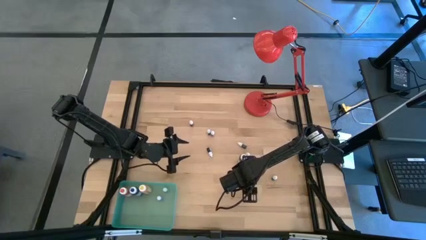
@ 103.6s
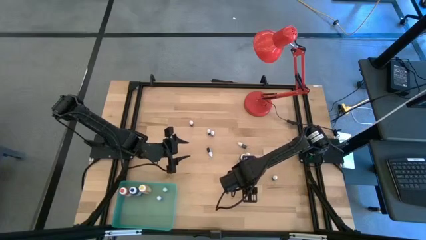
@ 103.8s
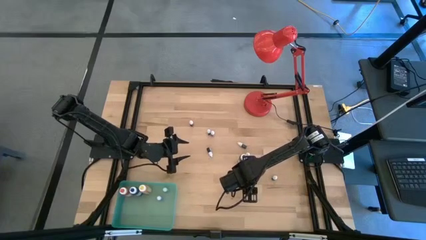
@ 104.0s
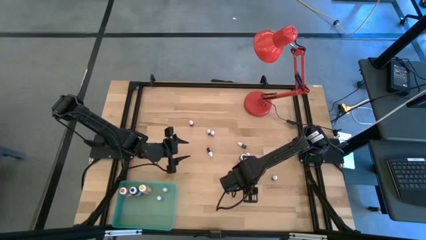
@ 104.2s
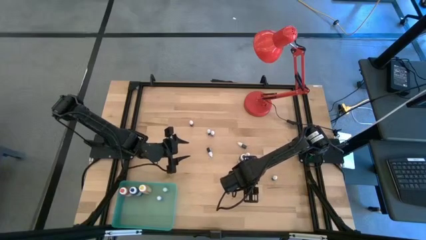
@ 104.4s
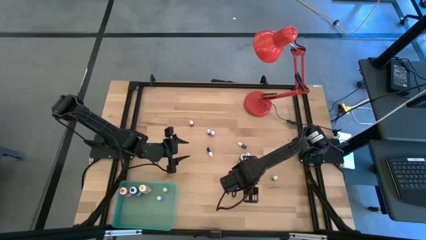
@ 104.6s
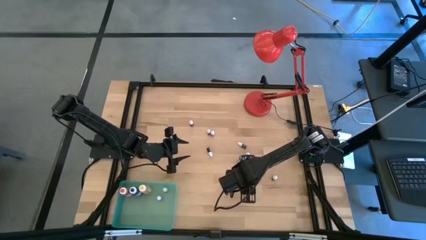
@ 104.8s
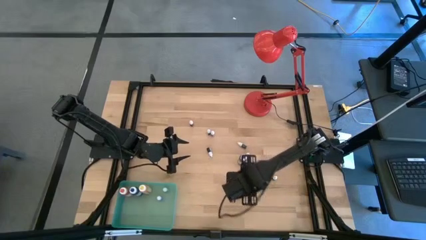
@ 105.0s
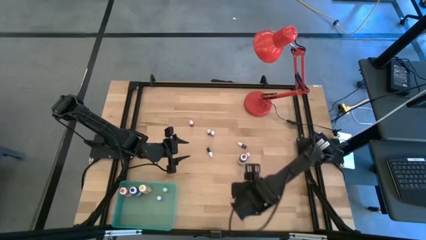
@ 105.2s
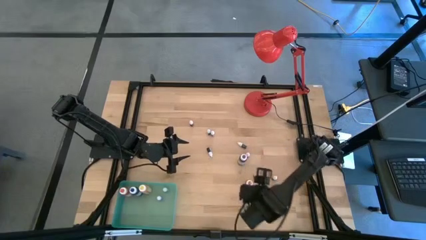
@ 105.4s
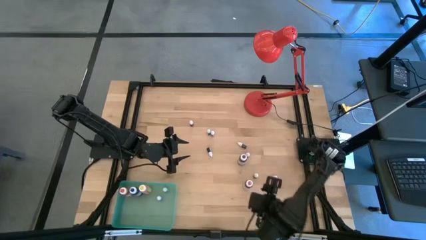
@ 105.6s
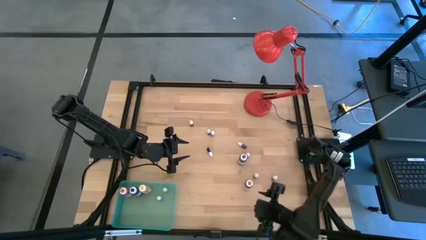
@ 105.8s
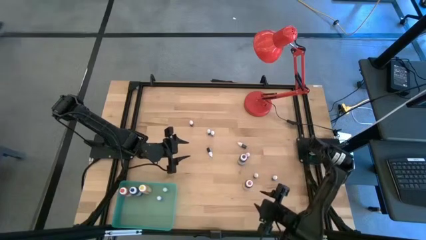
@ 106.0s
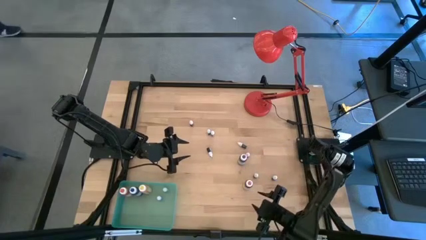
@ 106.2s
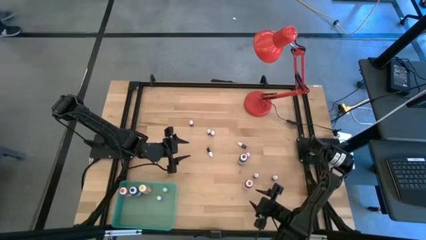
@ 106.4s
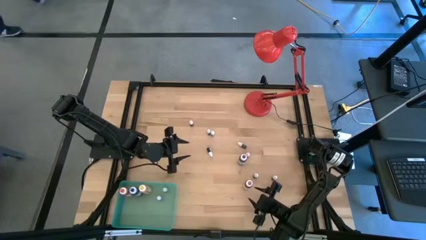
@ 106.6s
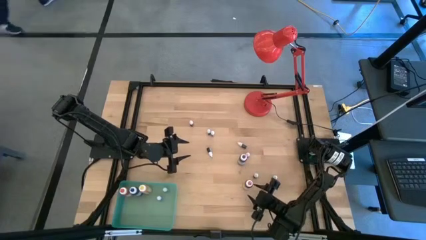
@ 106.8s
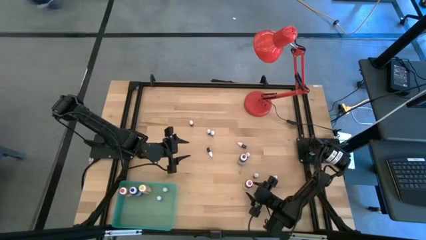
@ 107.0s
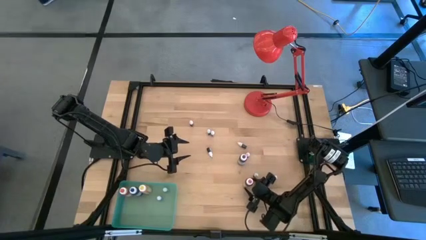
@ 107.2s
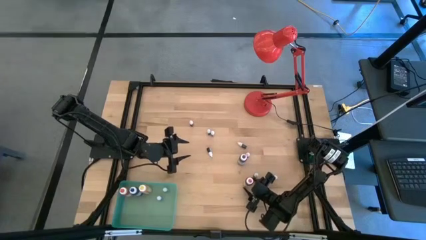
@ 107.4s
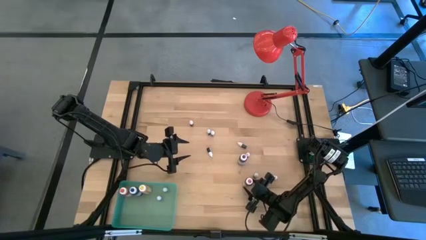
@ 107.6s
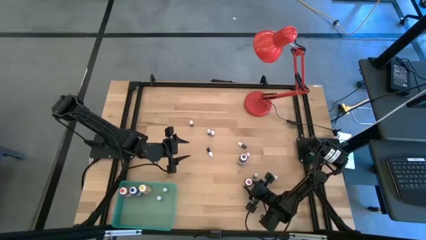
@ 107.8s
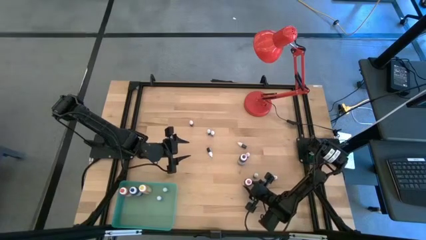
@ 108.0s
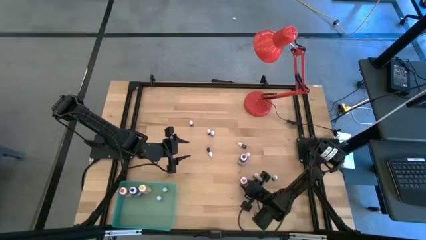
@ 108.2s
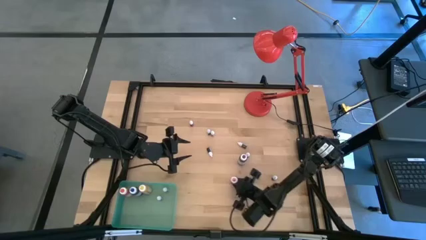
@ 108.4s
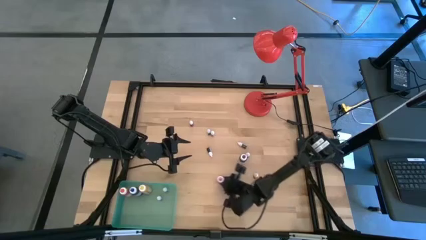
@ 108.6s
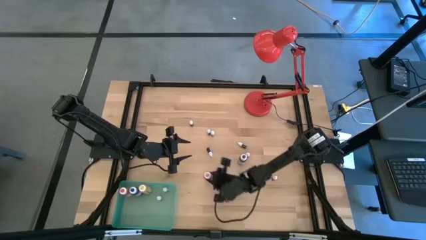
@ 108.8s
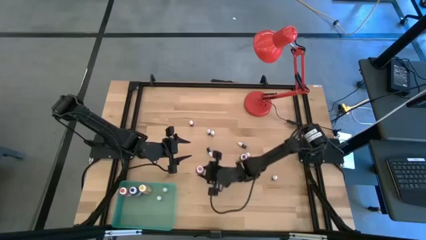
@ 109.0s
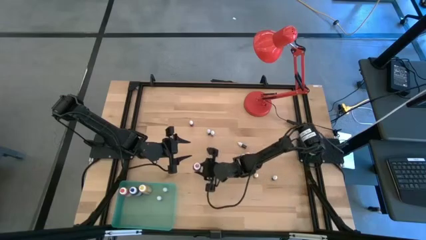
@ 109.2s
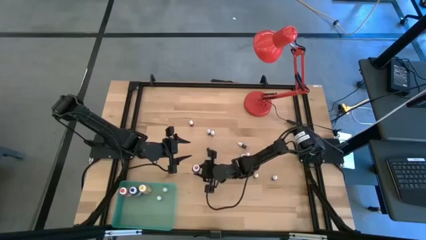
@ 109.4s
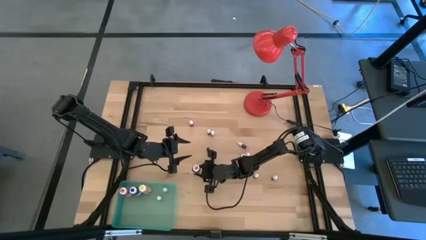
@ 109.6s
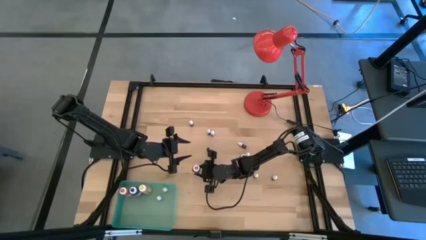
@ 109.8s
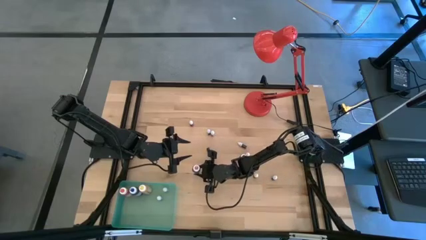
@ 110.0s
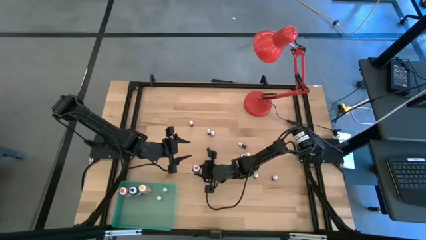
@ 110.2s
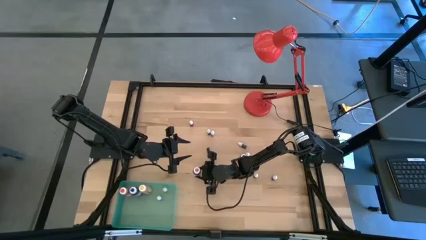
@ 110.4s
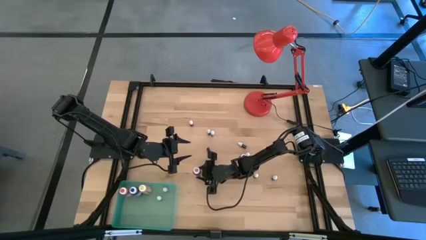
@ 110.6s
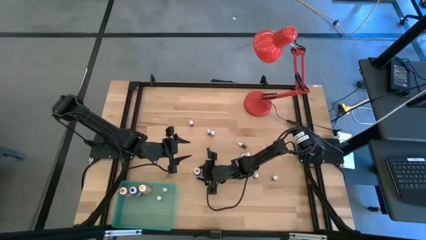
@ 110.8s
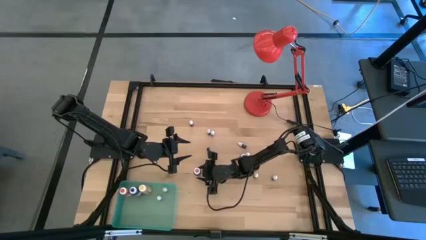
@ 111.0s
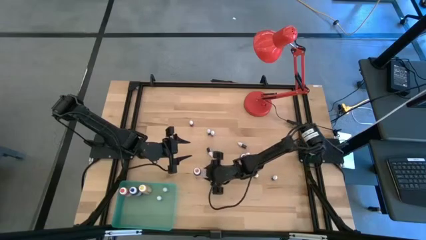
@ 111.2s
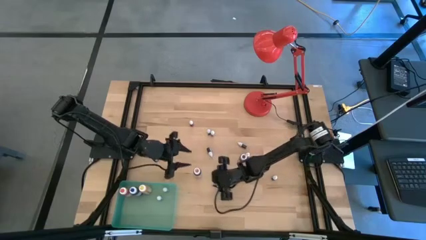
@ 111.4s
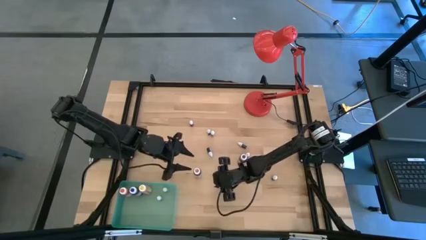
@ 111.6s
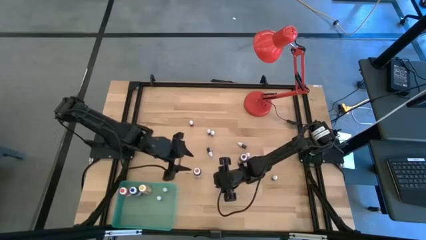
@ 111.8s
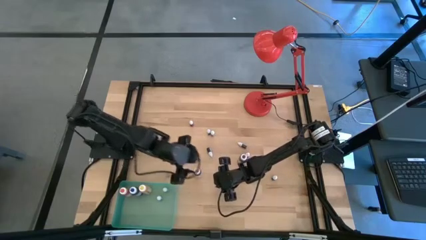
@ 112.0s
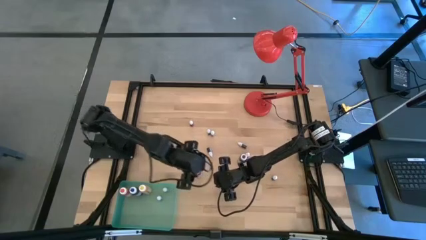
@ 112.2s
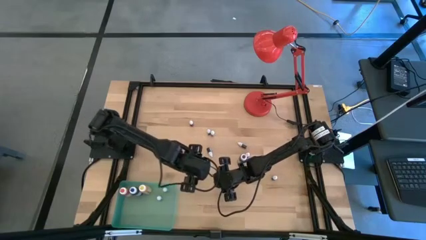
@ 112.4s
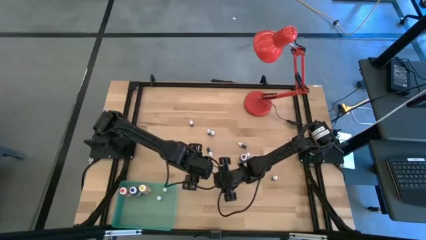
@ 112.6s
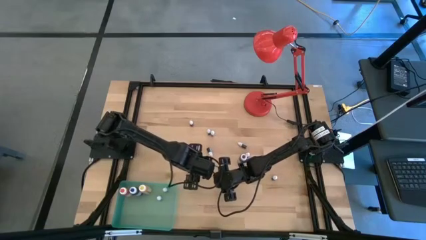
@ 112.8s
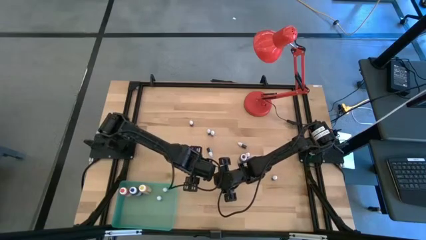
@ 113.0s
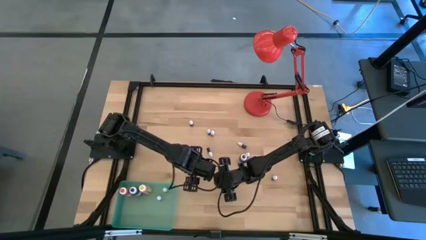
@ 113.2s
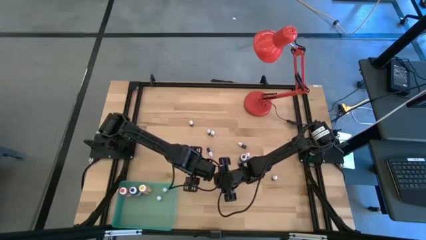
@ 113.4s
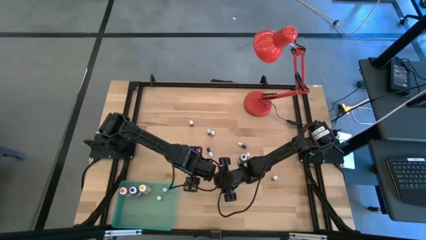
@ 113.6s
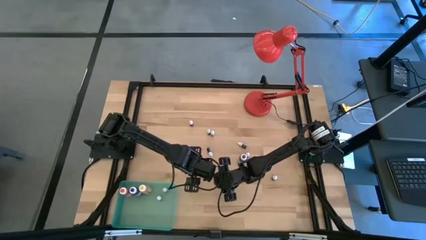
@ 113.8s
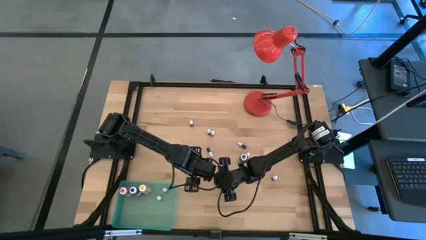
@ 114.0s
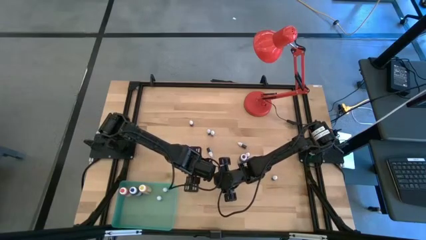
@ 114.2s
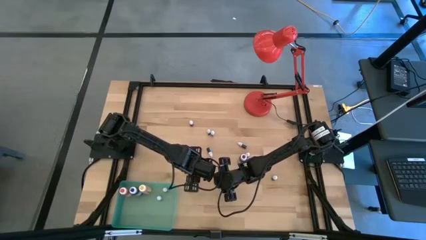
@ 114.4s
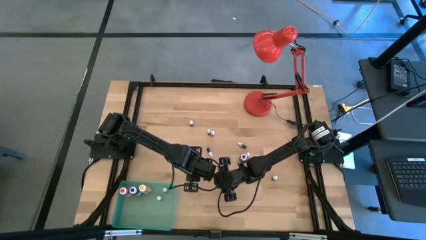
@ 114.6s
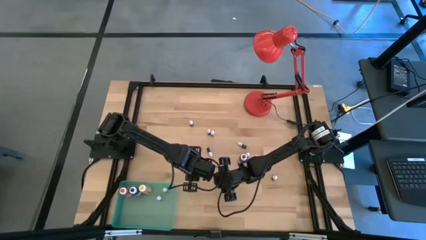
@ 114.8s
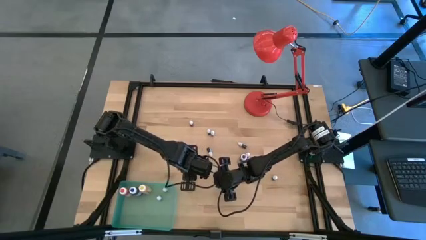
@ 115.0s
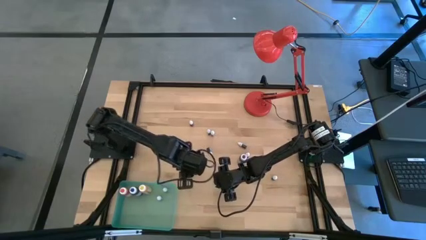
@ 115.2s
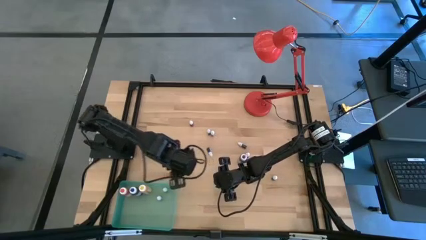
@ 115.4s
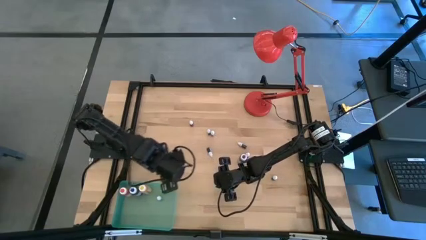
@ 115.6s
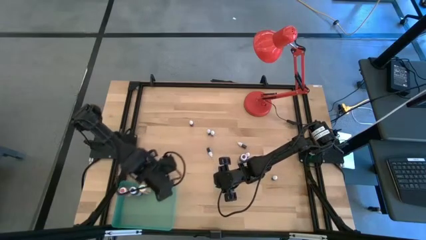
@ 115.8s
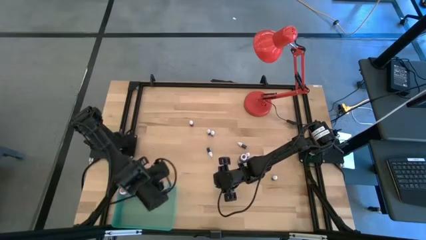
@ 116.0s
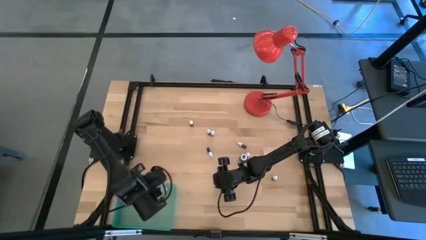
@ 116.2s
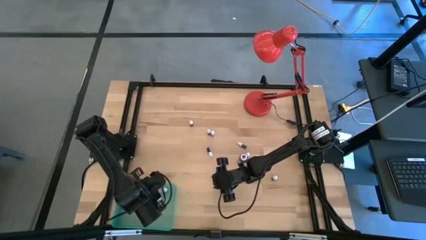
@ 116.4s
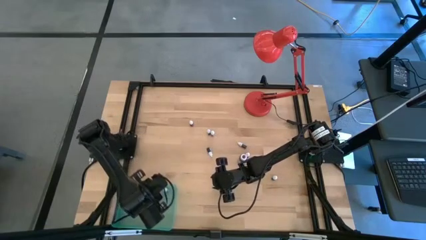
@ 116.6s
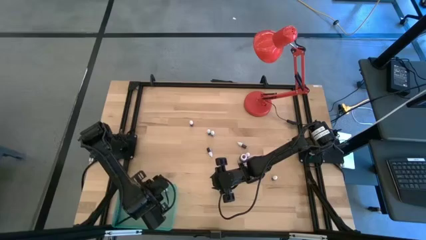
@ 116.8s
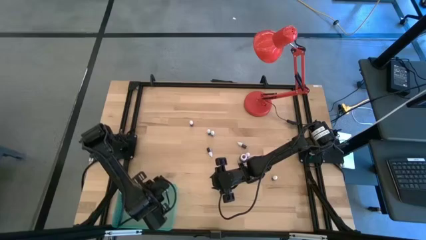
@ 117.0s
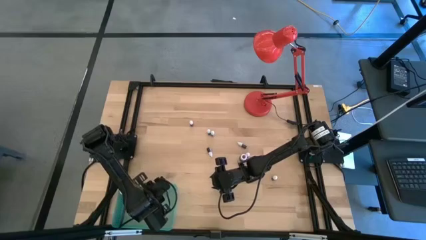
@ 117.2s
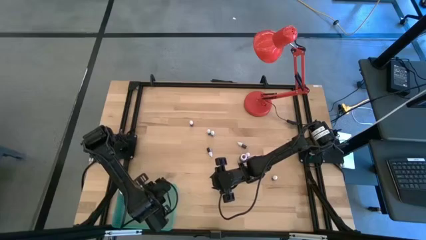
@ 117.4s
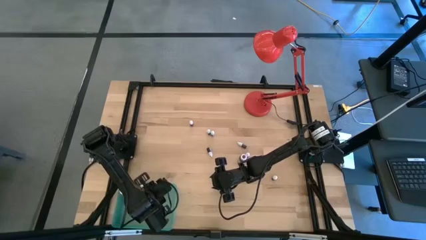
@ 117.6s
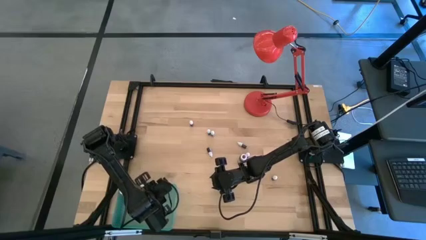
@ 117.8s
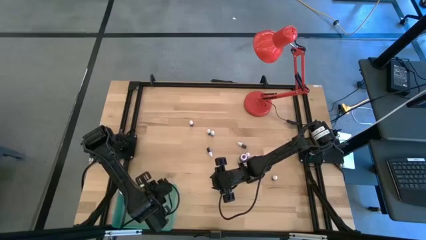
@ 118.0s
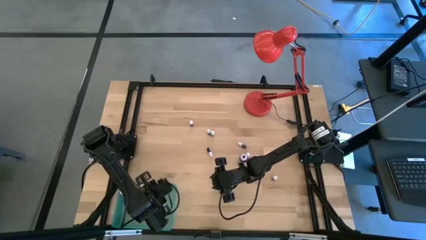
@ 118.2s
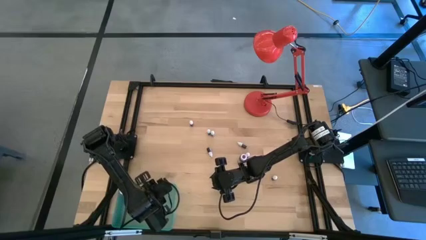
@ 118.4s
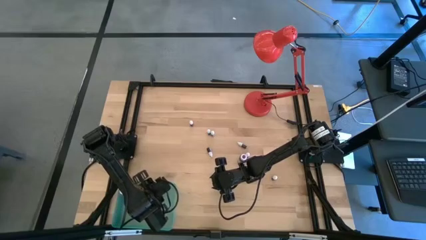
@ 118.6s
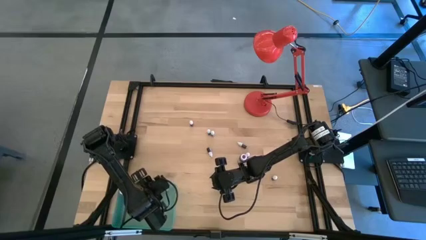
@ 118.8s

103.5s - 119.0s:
Task: Pick & Place food coloring
Put the red food coloring into the blue bin
